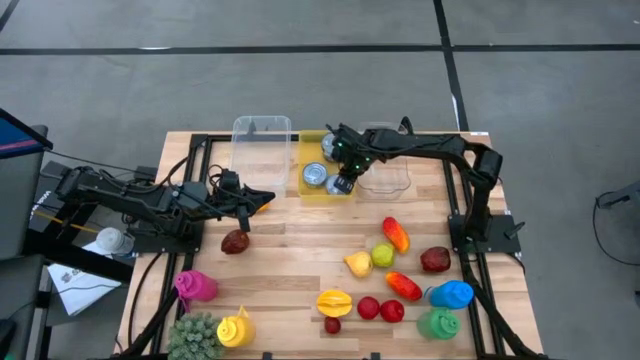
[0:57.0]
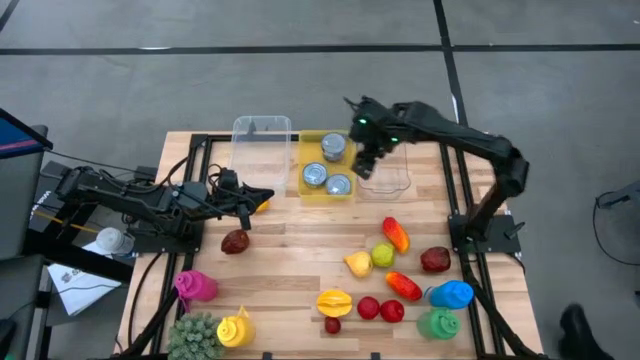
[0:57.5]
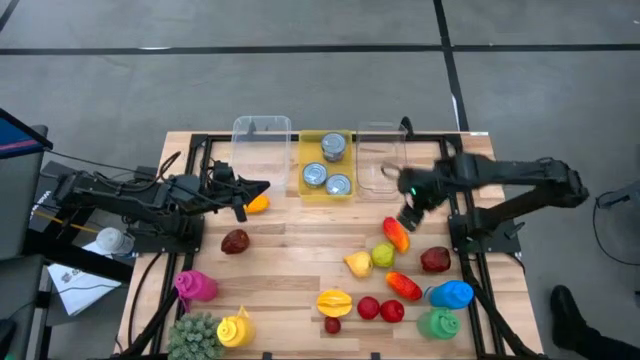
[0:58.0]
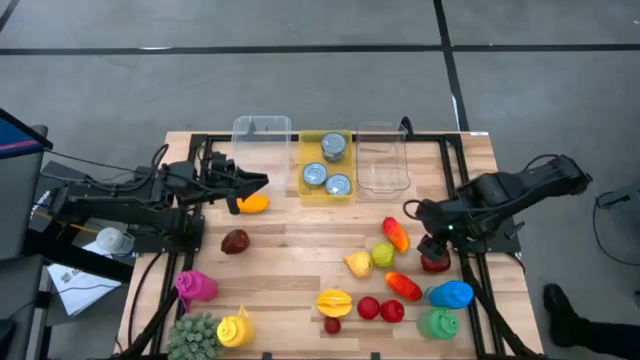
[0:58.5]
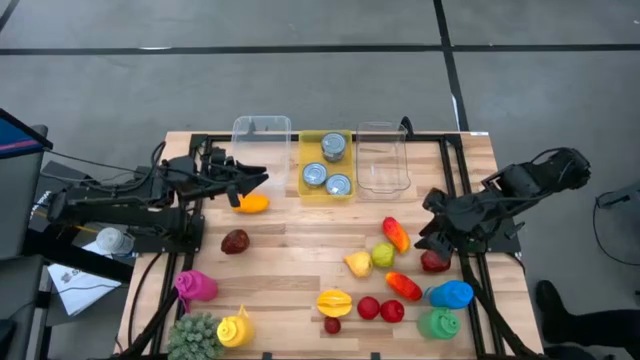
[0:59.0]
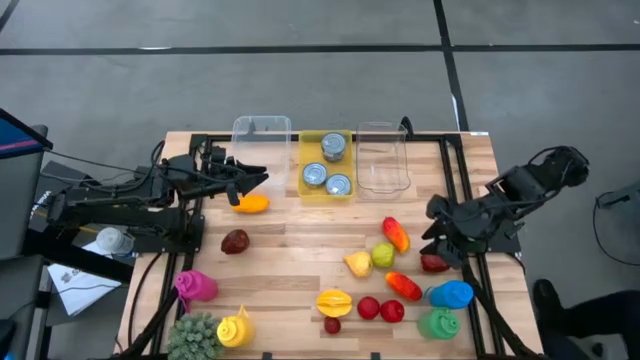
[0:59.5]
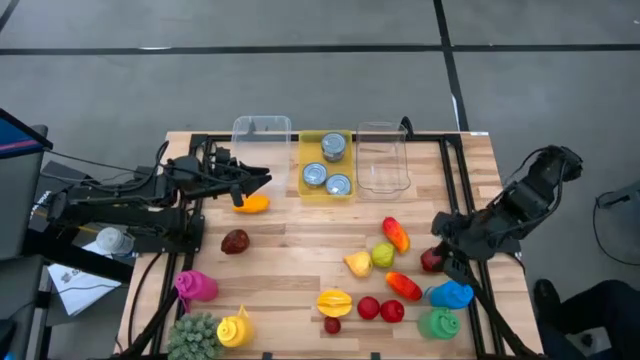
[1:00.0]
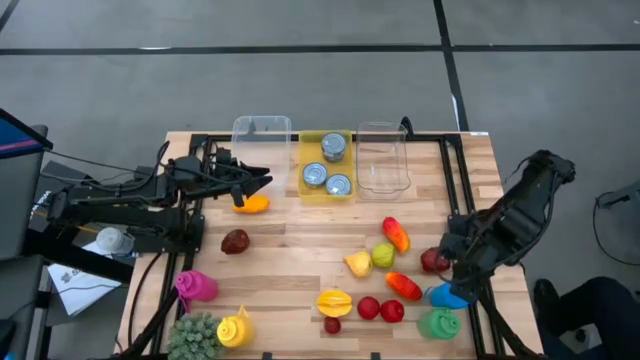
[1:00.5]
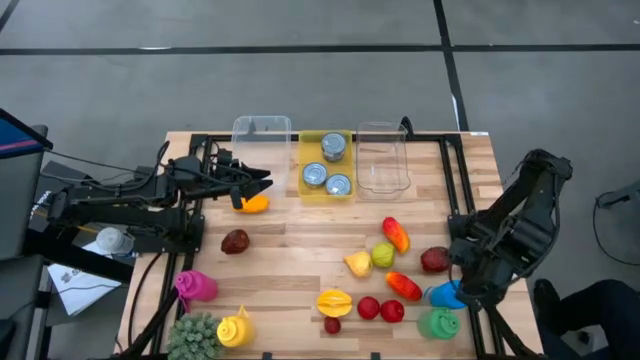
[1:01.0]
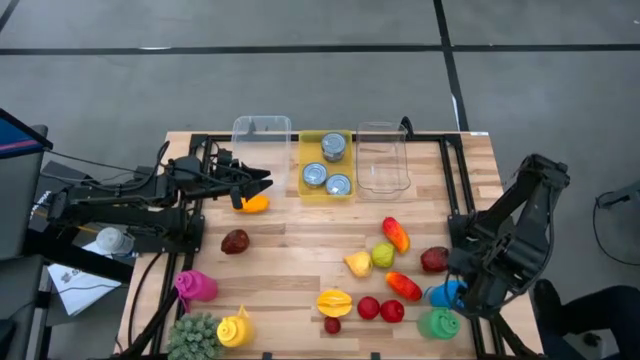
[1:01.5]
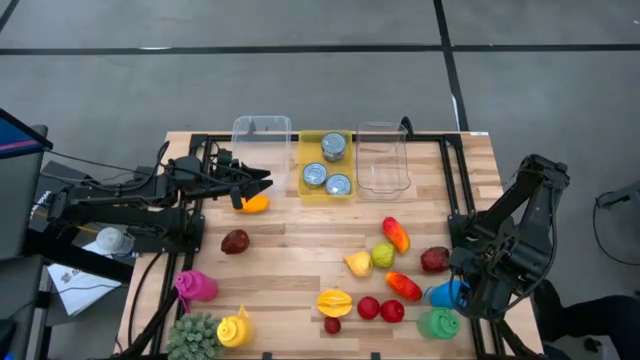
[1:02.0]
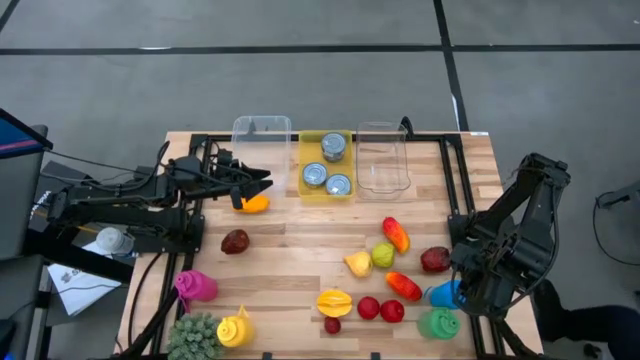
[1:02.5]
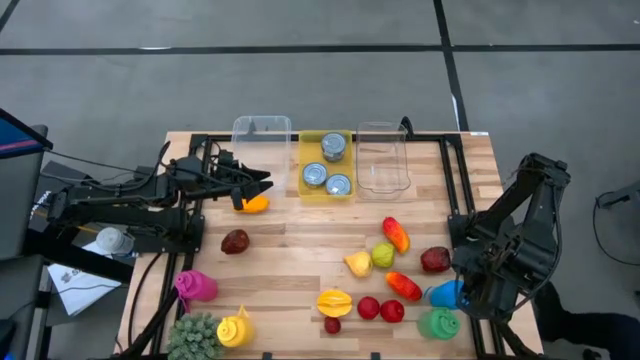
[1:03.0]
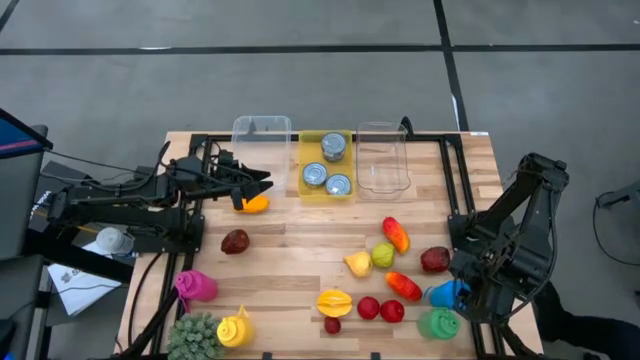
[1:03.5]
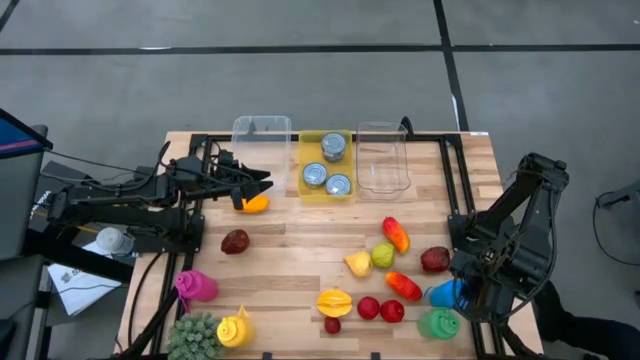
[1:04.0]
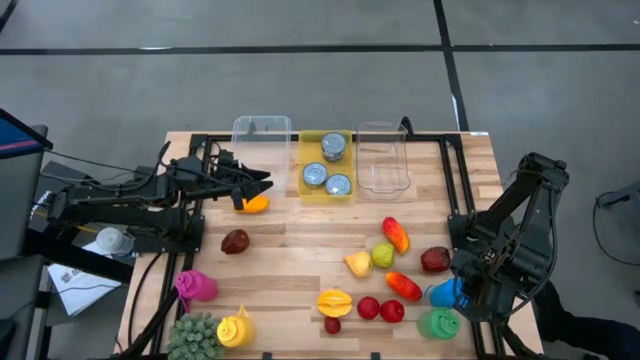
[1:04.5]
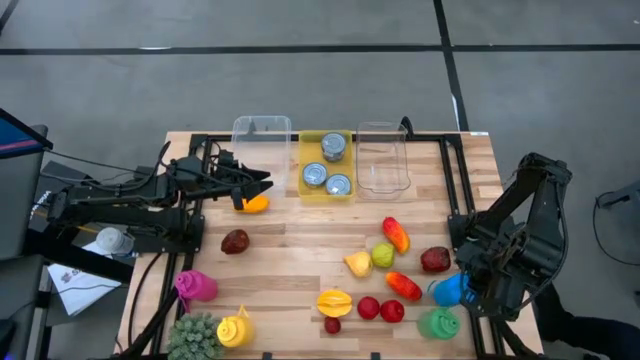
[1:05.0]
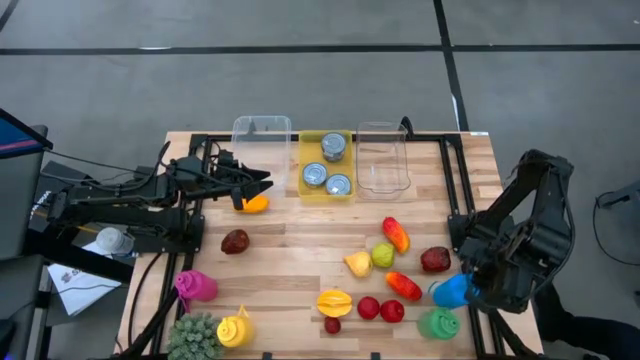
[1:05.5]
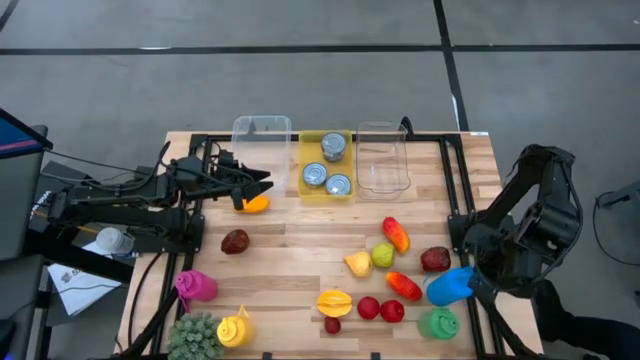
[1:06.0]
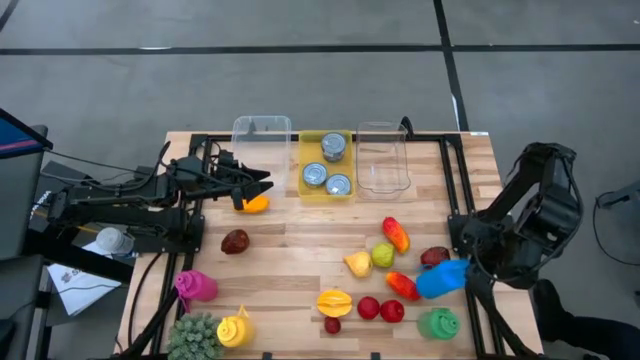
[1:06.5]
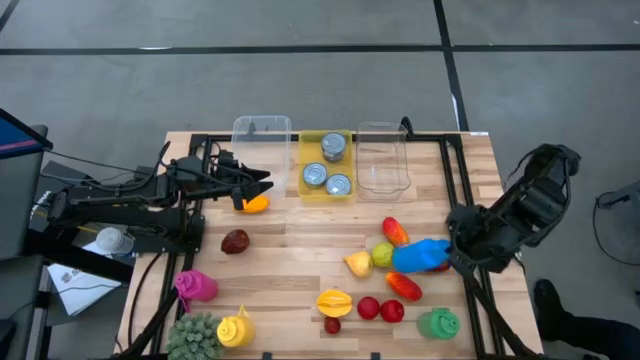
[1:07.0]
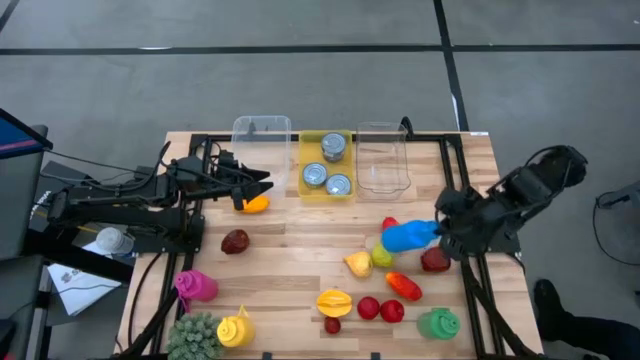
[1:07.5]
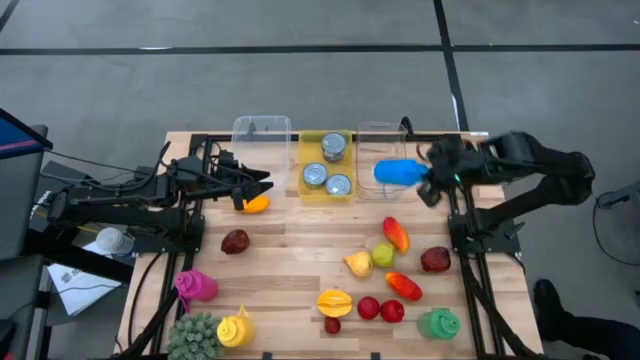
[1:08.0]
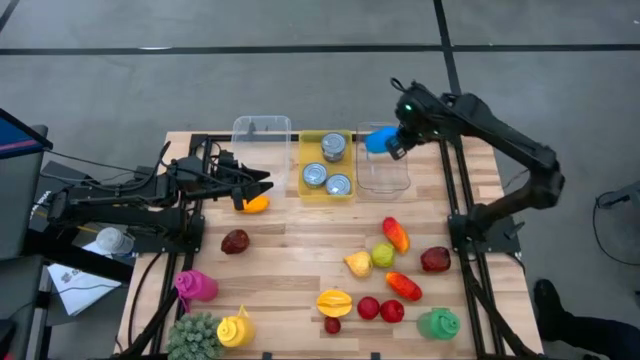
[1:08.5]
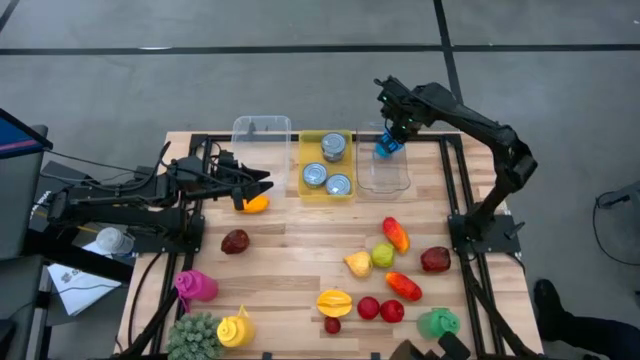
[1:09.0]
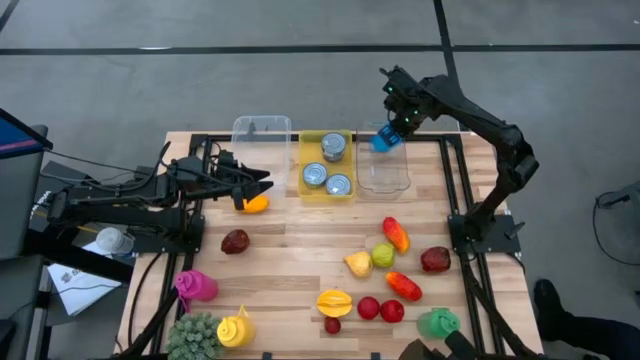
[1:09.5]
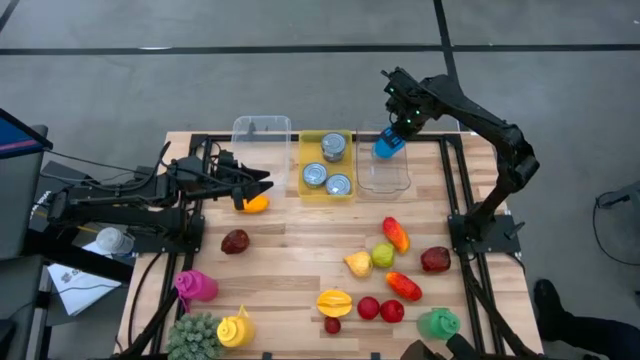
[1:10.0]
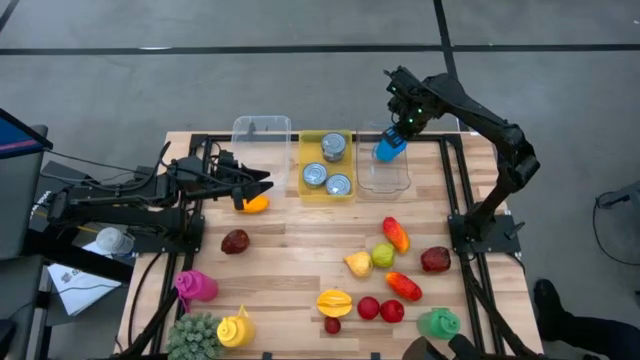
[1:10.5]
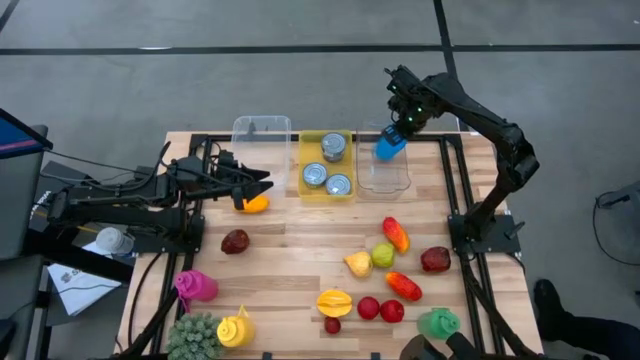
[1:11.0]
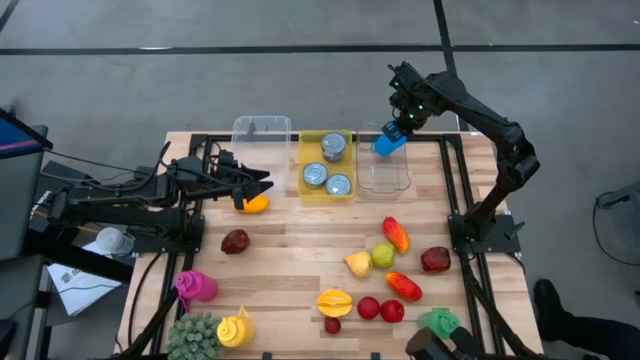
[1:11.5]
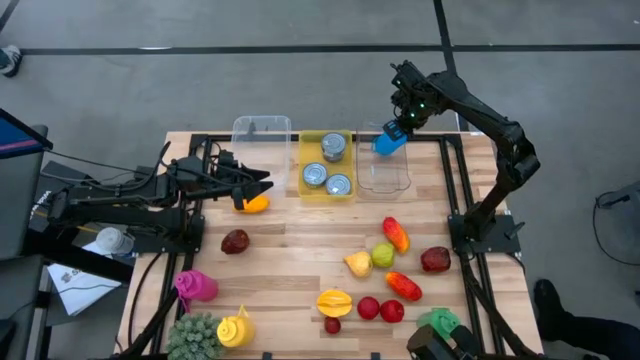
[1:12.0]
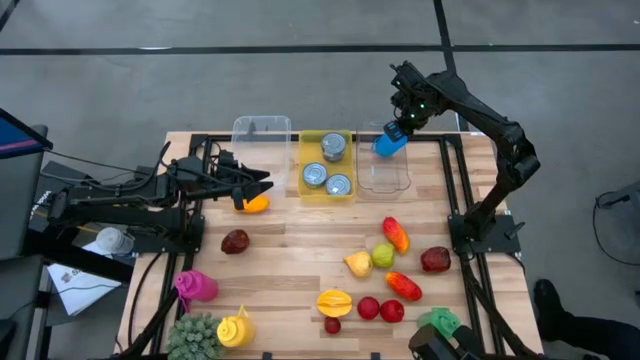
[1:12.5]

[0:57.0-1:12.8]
Task: Pick & Place Food Item
Put the blue tumbler into the transparent bin

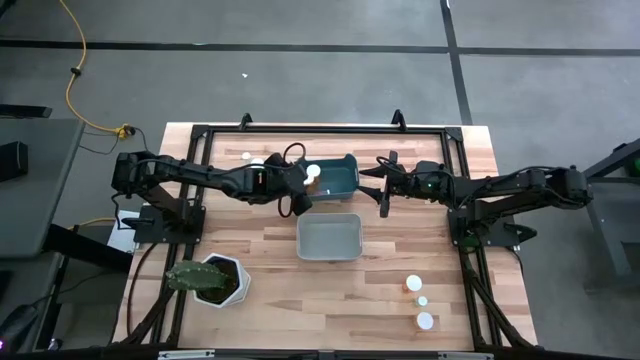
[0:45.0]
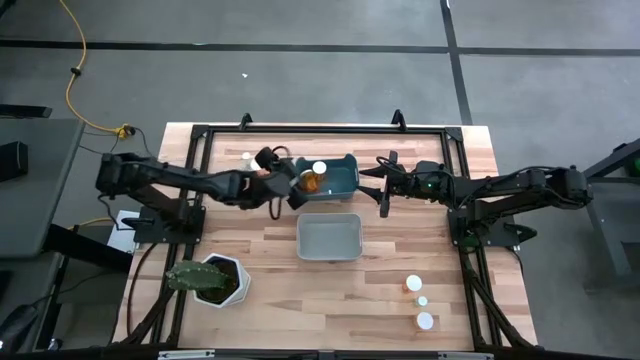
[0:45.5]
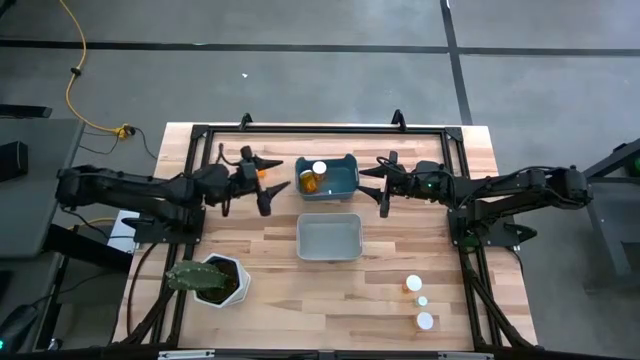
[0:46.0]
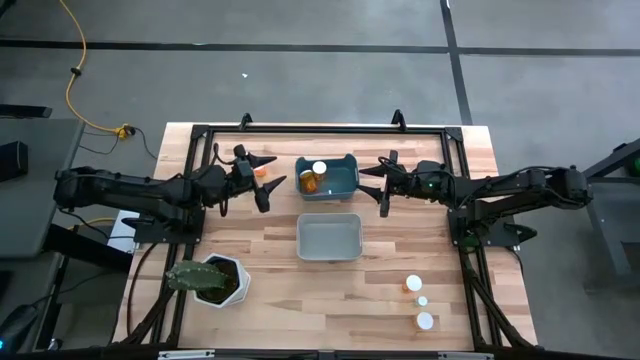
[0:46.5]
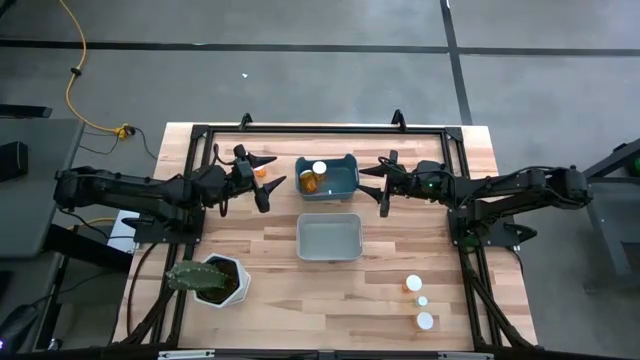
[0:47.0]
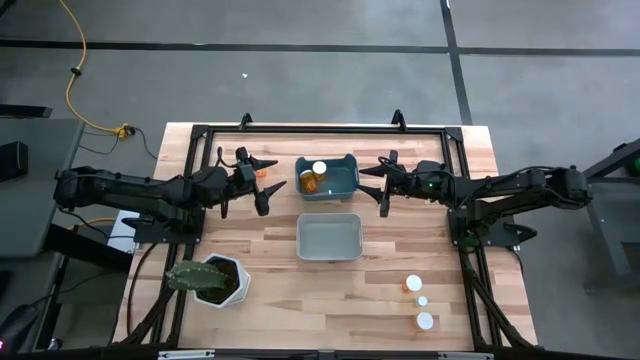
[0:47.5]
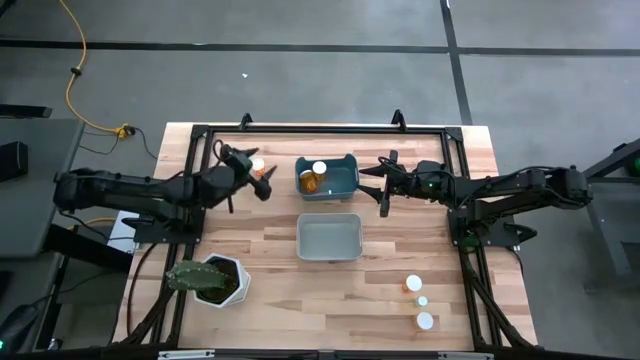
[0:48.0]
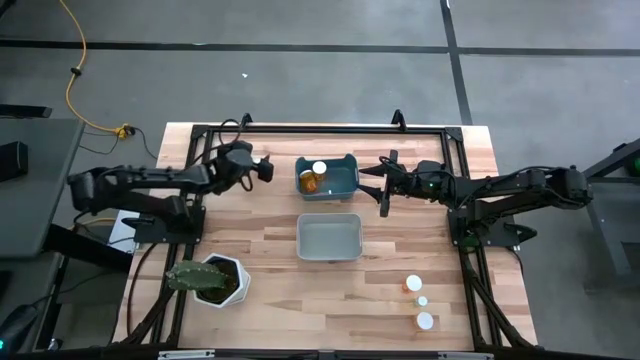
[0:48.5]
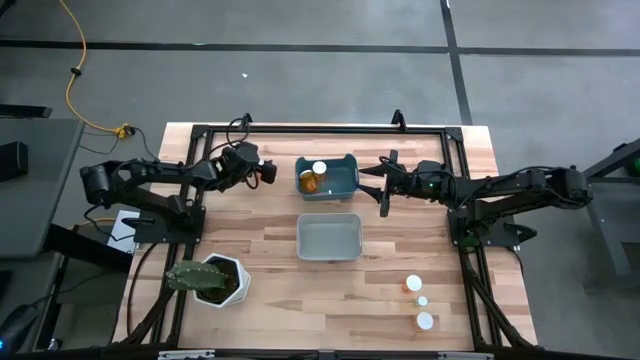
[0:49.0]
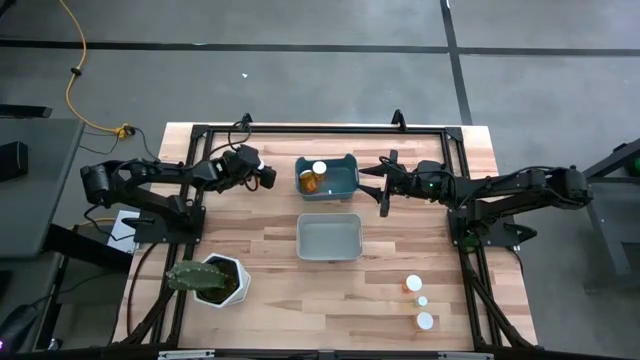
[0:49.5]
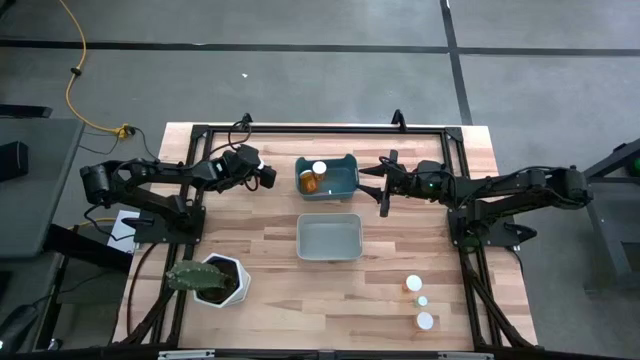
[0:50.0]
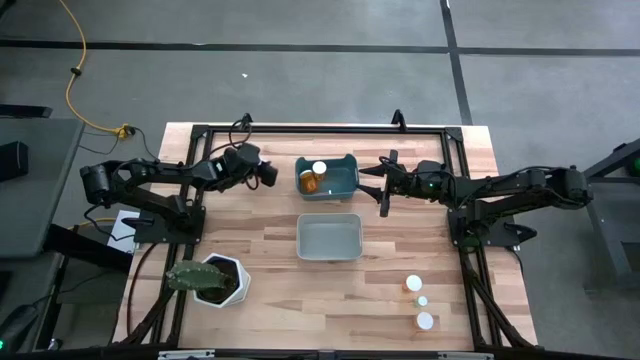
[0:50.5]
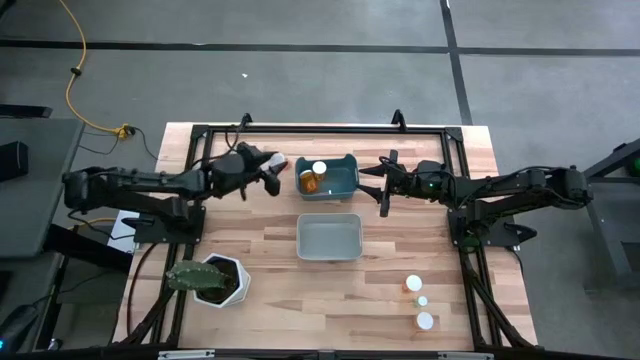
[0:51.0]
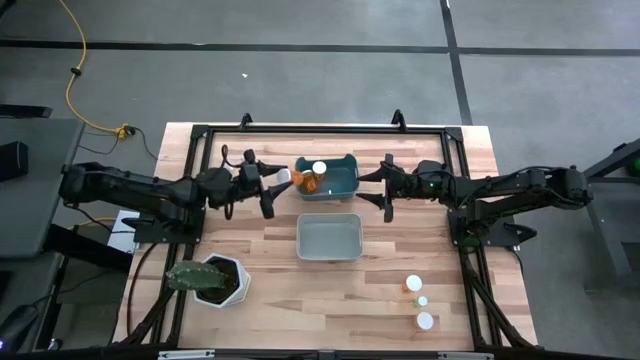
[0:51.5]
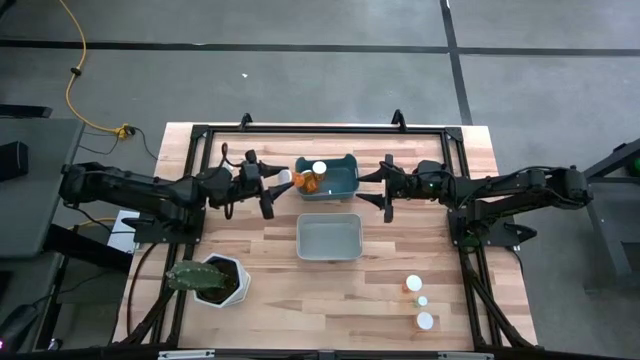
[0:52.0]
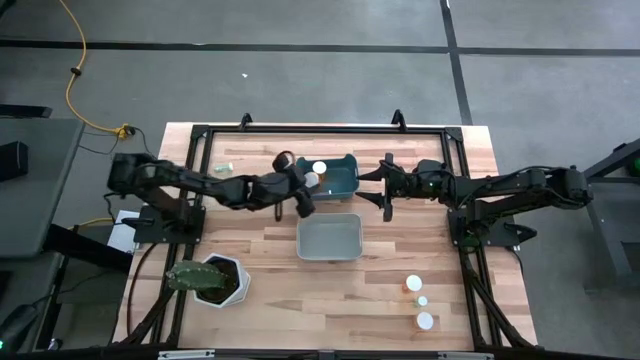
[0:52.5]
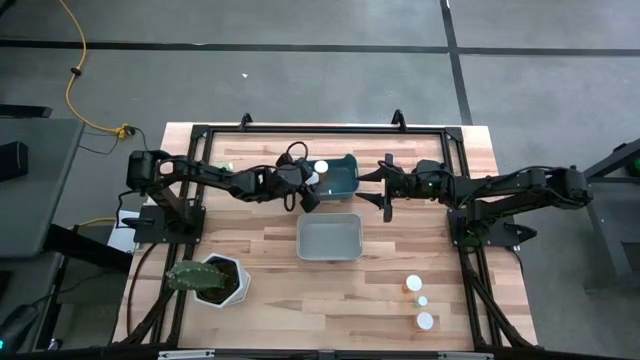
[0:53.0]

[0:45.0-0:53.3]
Task: Pick and place medicine bottles into bin by pill shape (circle, oval)
Put the orange capsule bottle into the blue bin
